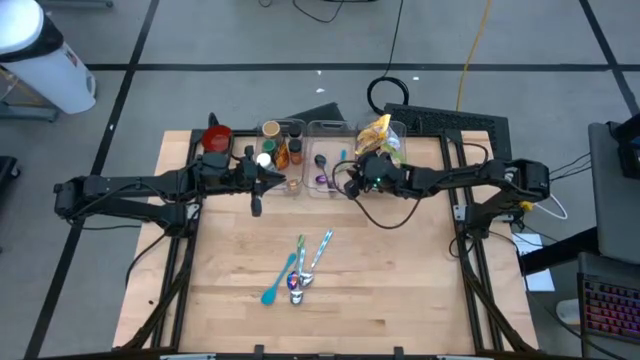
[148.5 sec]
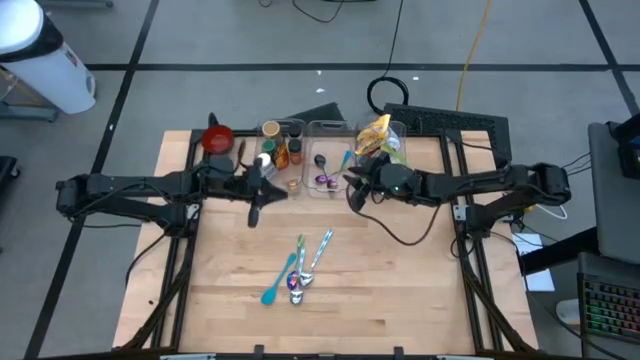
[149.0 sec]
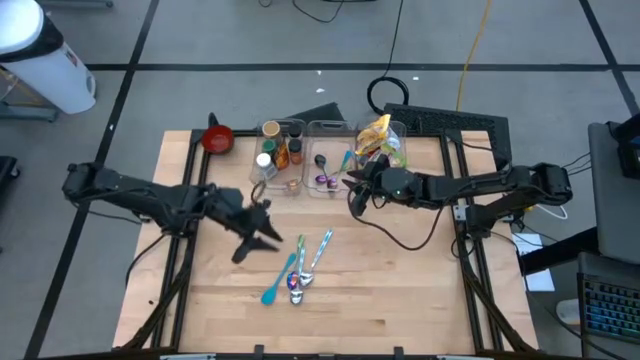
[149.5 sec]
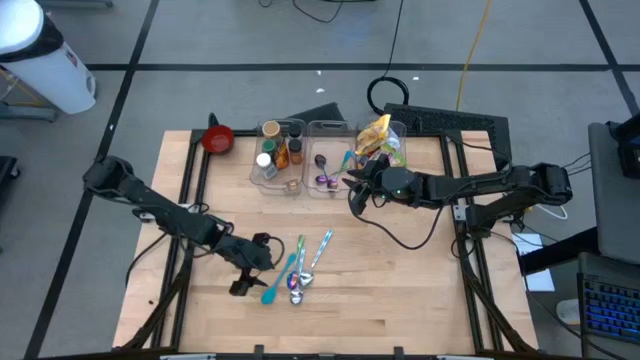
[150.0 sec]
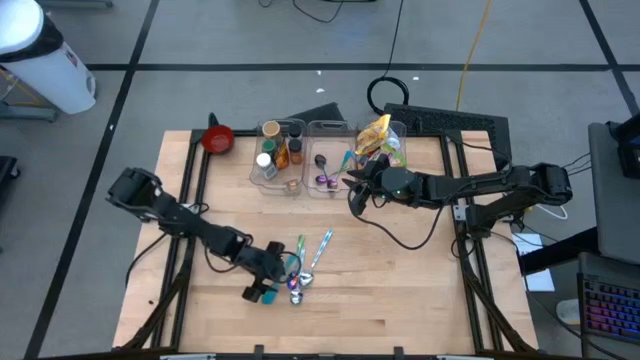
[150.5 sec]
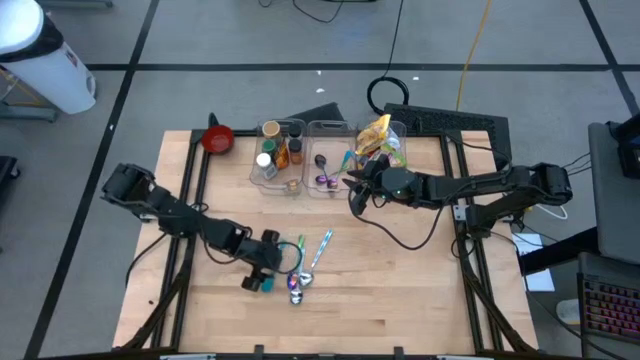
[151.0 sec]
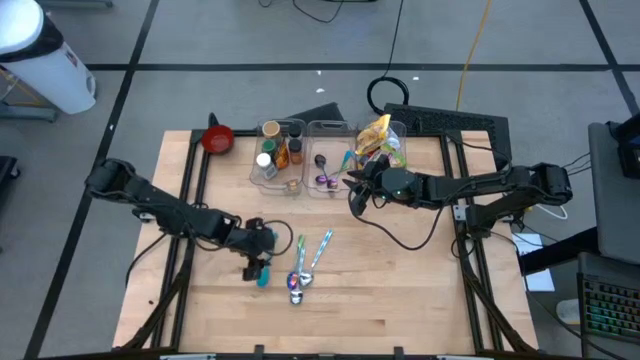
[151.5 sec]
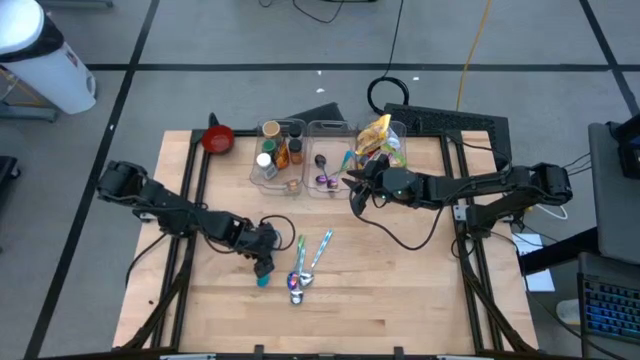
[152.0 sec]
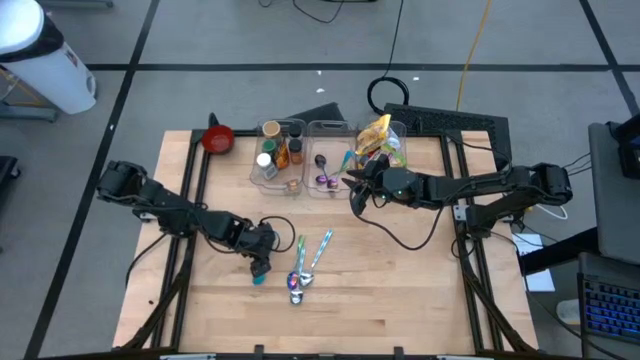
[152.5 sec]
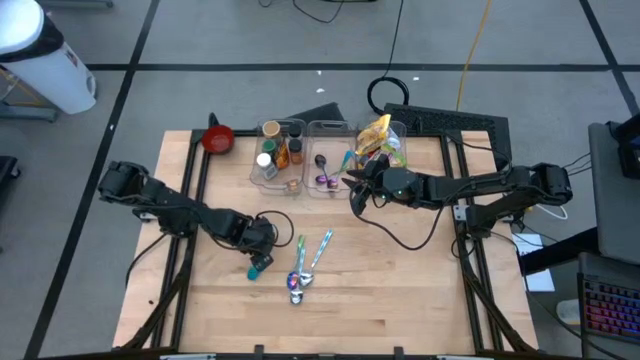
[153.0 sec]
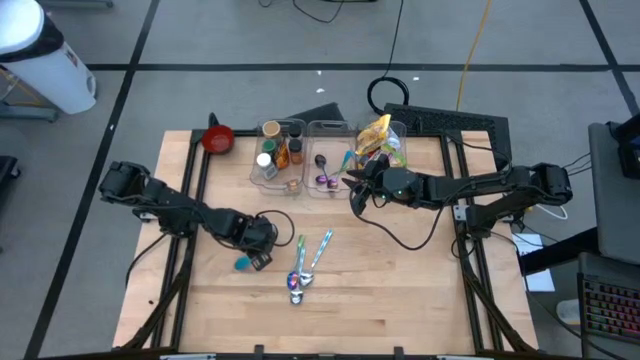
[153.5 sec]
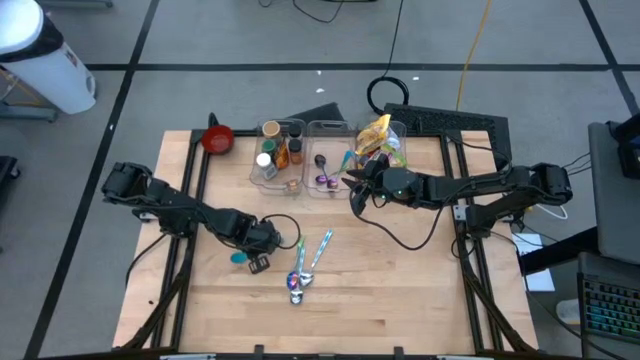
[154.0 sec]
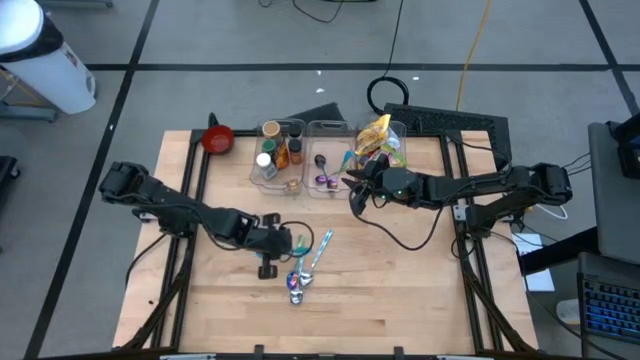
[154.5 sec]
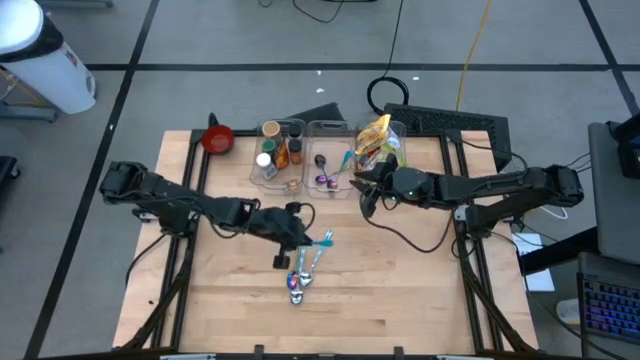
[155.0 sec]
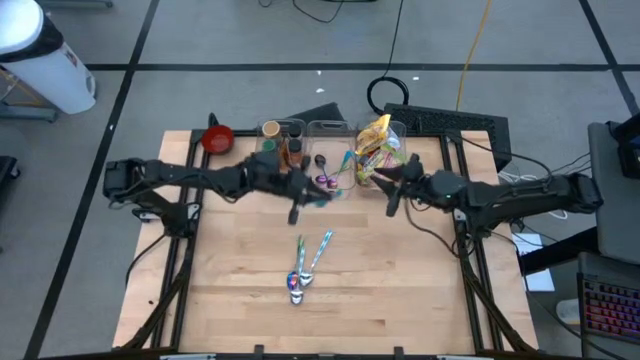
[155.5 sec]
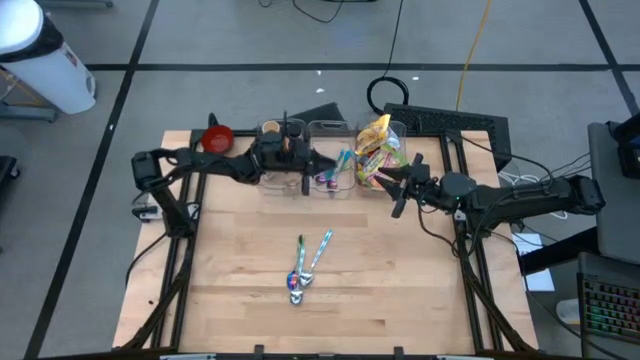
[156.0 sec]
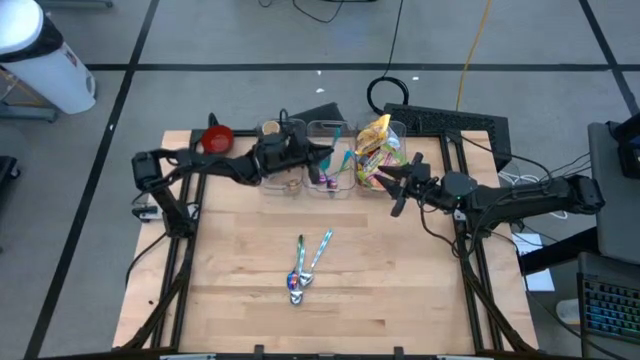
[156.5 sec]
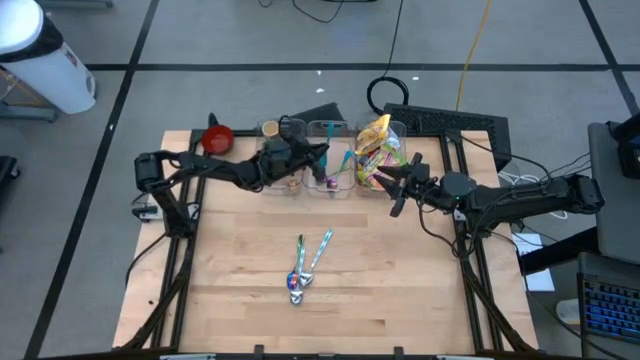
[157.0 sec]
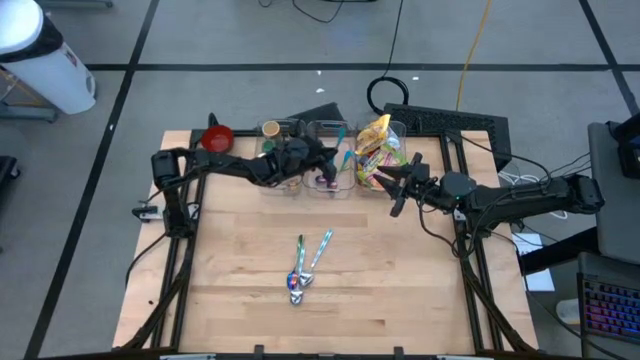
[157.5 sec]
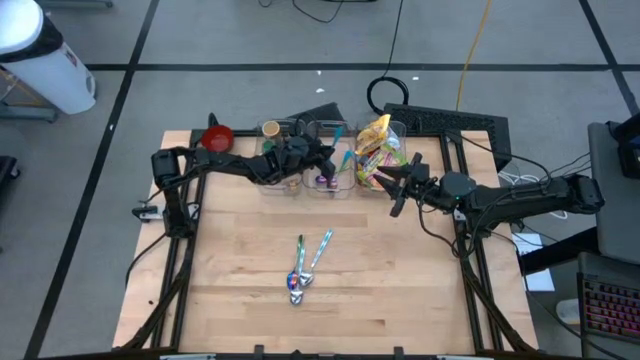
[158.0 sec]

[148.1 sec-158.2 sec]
Task: Pick & Place Food Item
Put the blue spoon into the middle transparent bin

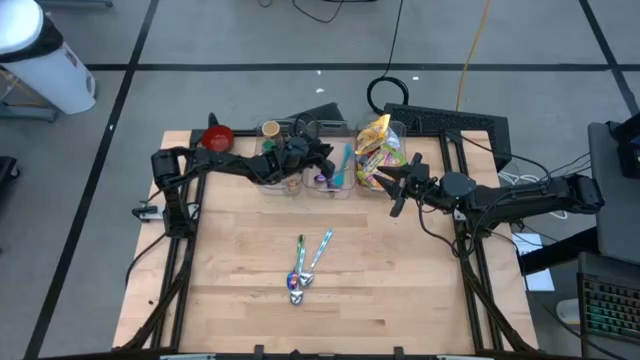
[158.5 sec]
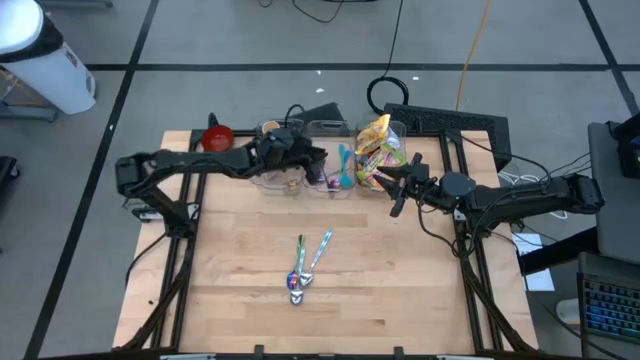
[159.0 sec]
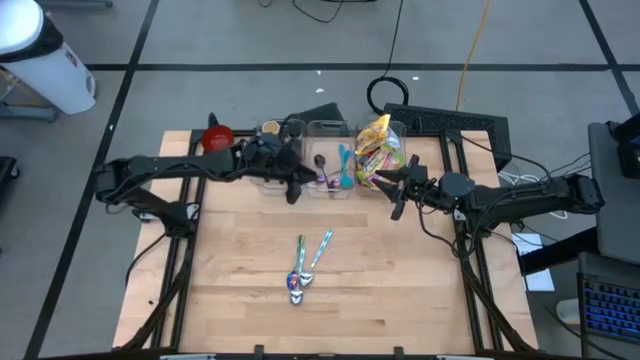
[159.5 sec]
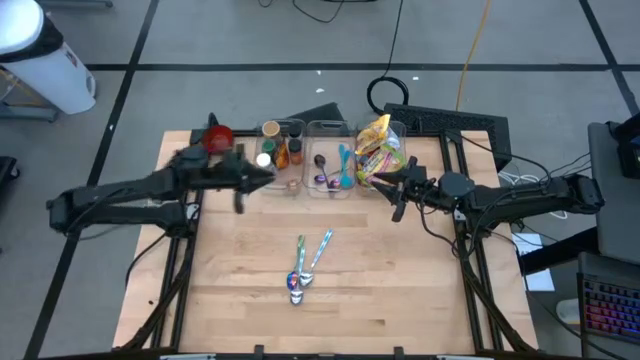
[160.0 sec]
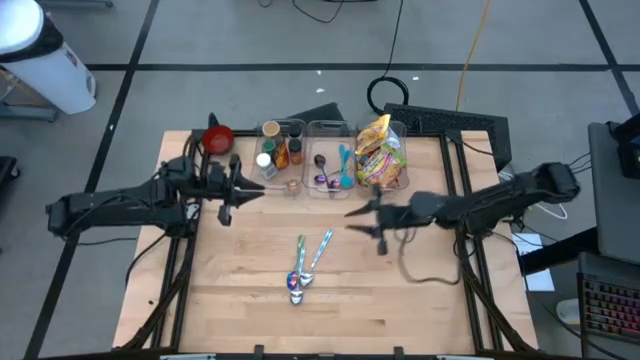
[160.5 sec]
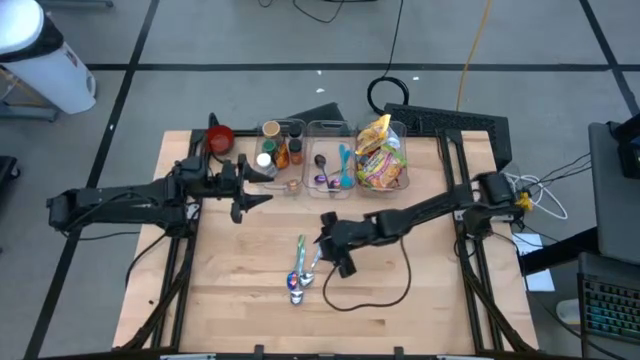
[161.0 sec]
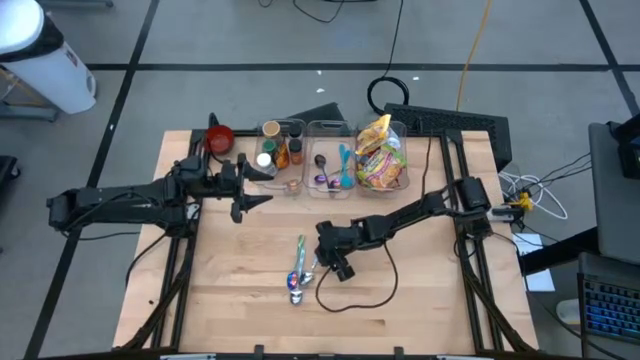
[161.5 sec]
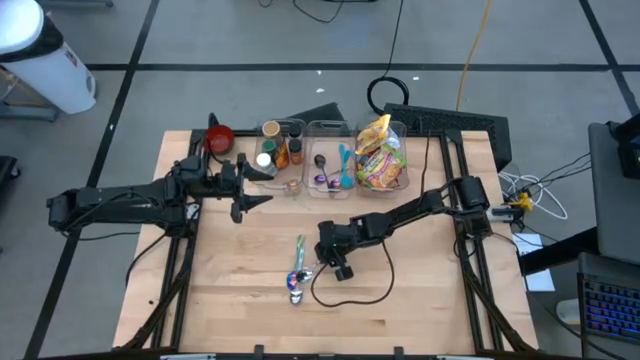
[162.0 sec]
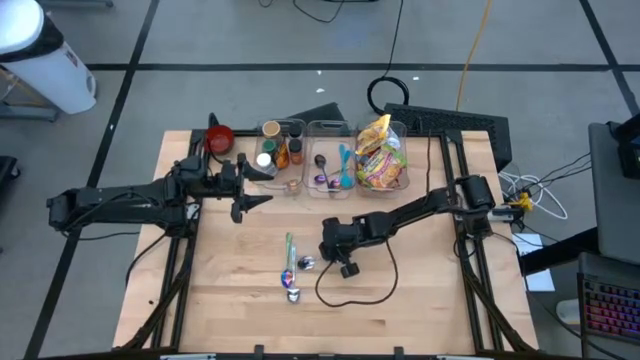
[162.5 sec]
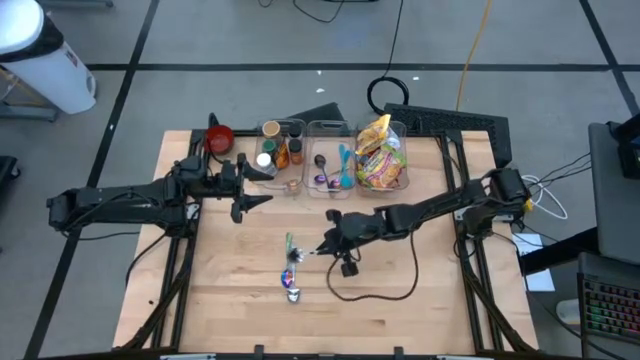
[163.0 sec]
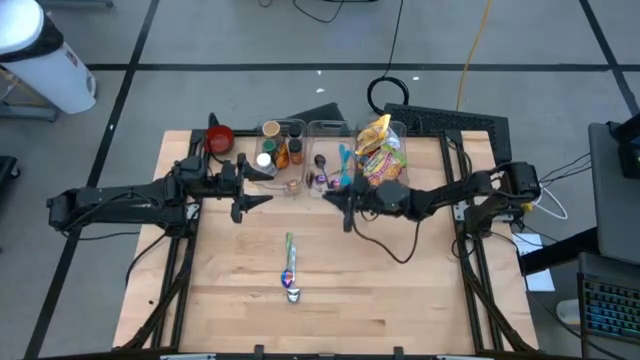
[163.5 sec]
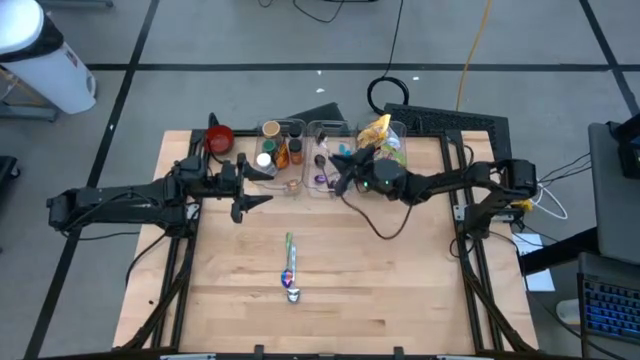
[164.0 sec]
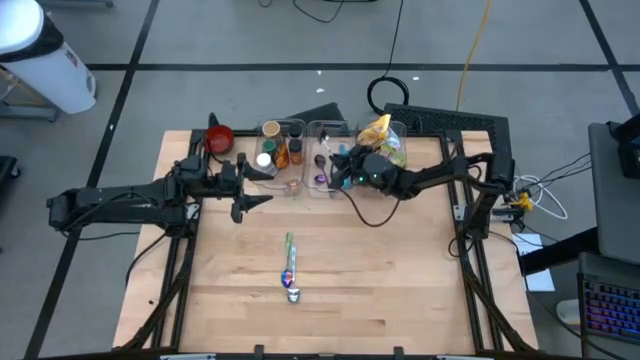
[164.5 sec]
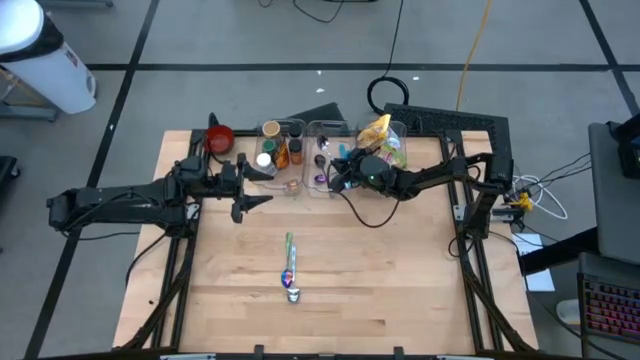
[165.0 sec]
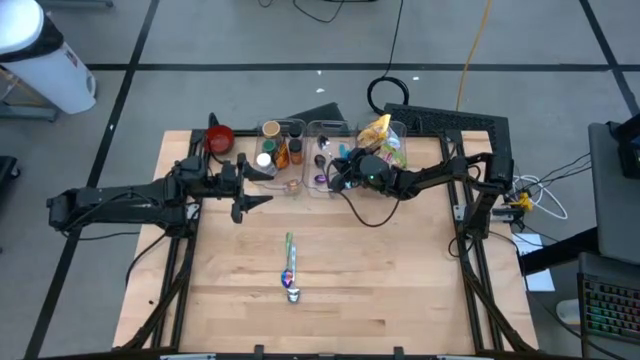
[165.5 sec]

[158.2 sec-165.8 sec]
Put the right white blue spoon into the middle transparent bin

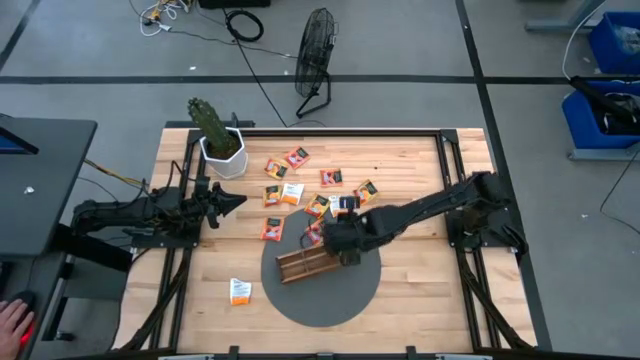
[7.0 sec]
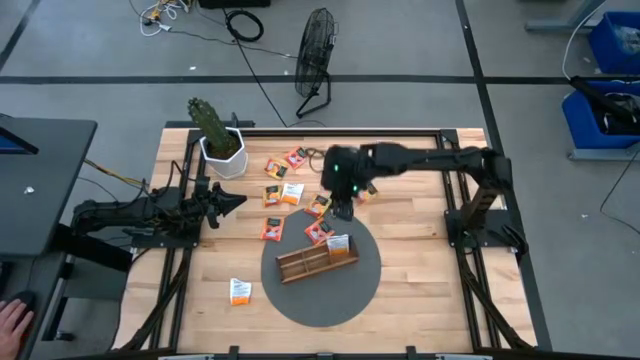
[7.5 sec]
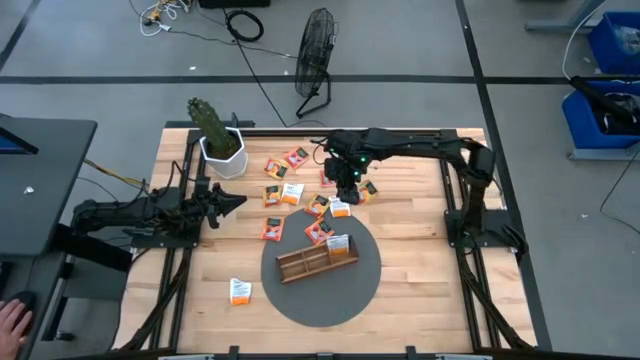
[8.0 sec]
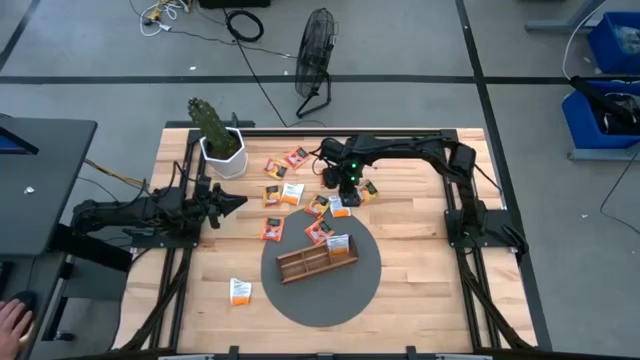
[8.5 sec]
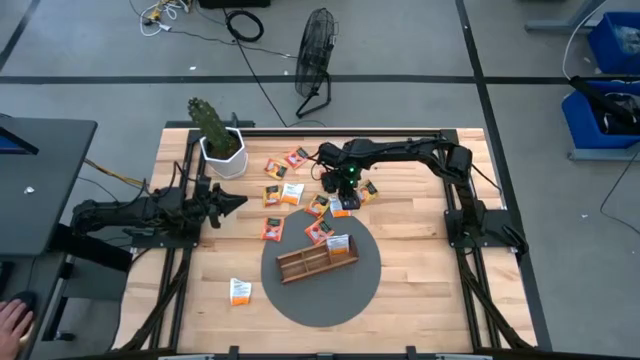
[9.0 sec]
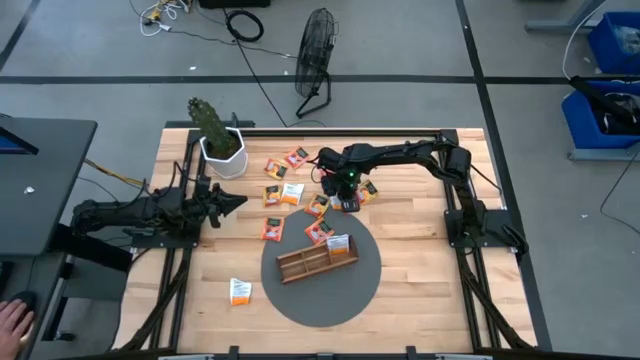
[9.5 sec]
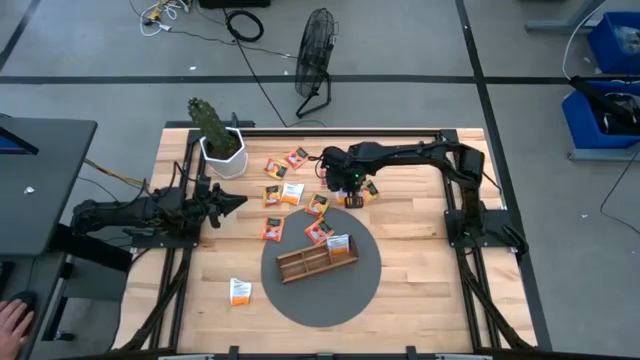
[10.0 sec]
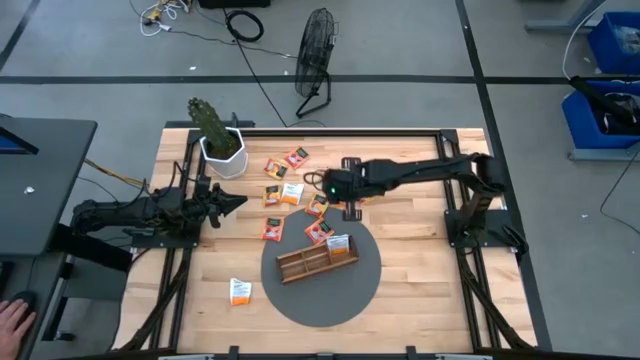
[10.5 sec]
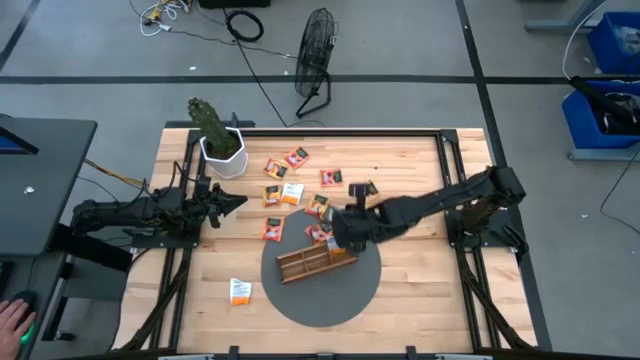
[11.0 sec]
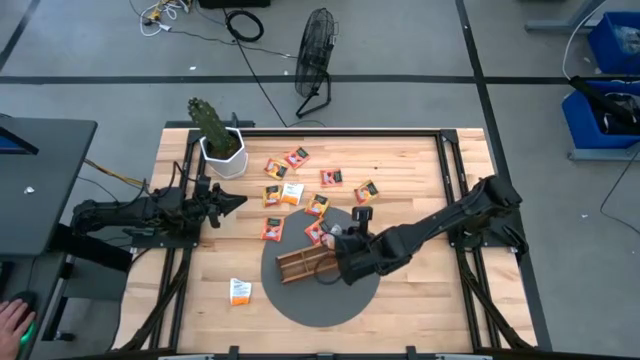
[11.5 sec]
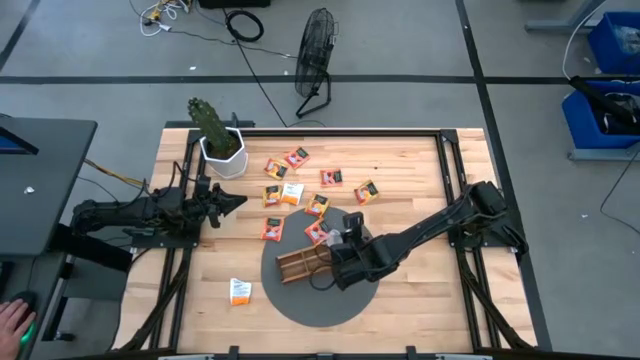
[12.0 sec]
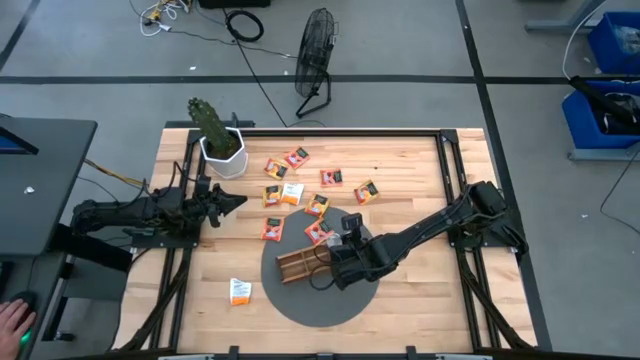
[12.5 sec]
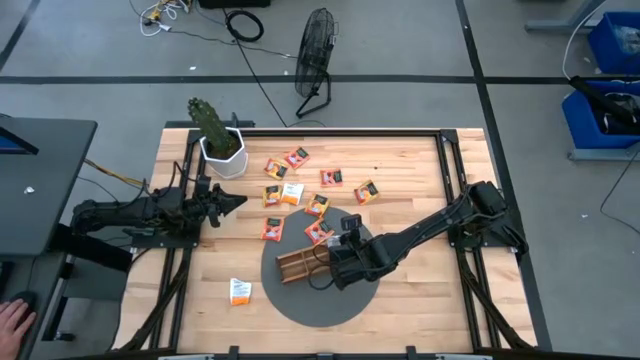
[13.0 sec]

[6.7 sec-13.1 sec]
Task: Pick & Place Tea
Put the top right white tea bag into the right section of the wooden organizer
